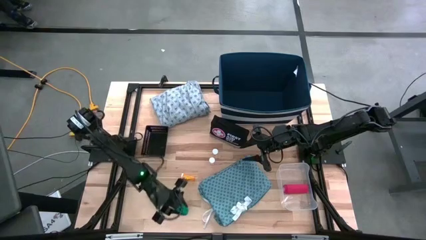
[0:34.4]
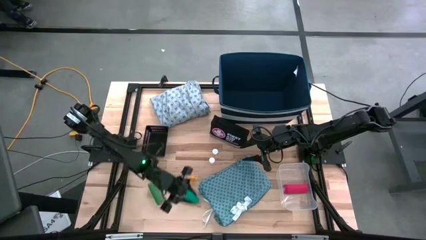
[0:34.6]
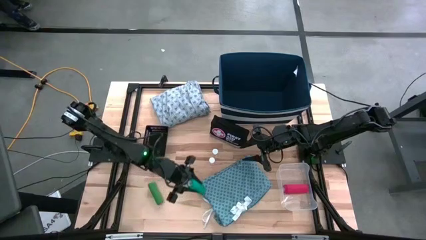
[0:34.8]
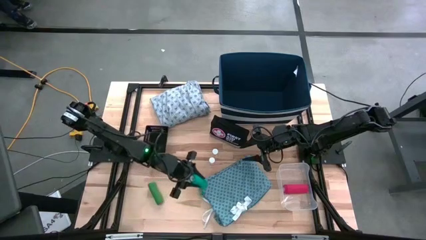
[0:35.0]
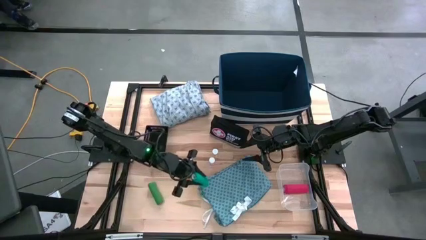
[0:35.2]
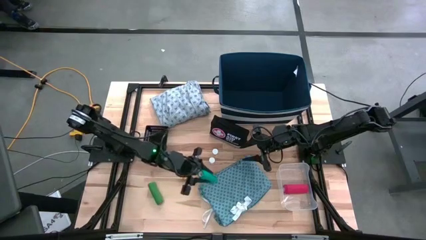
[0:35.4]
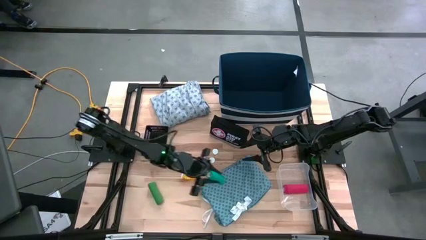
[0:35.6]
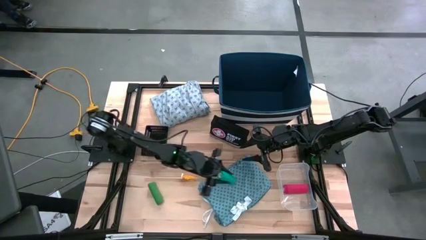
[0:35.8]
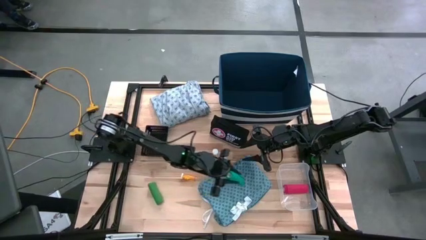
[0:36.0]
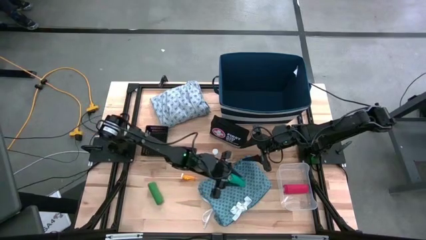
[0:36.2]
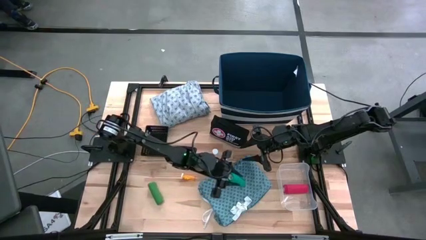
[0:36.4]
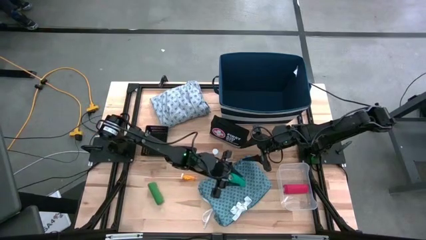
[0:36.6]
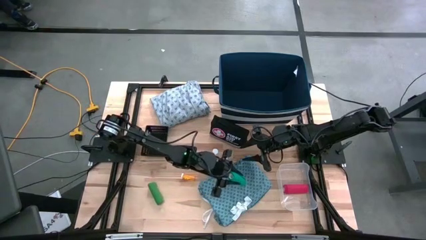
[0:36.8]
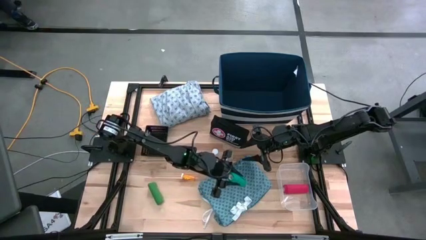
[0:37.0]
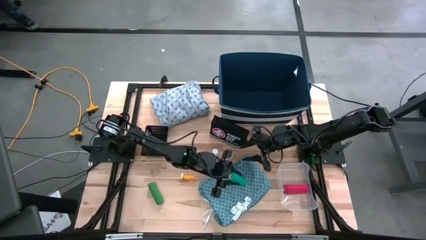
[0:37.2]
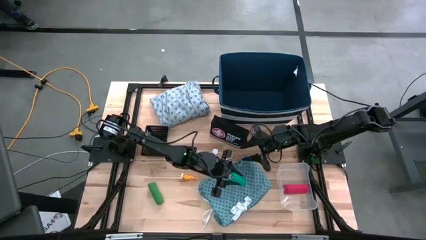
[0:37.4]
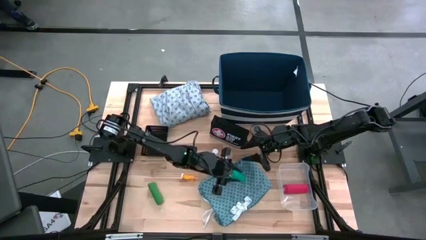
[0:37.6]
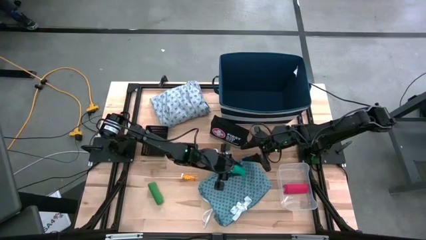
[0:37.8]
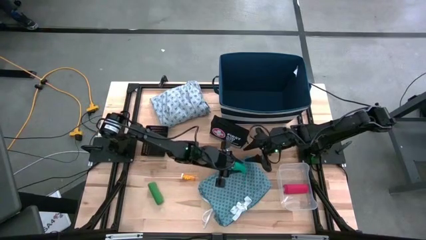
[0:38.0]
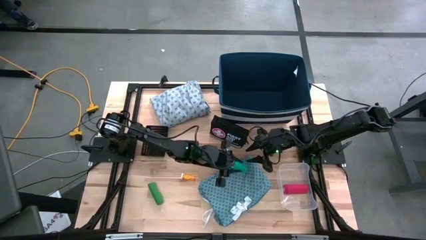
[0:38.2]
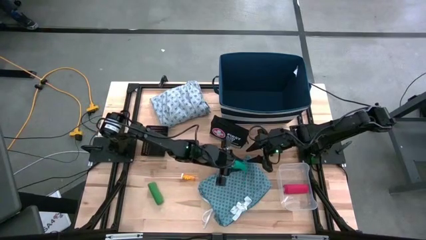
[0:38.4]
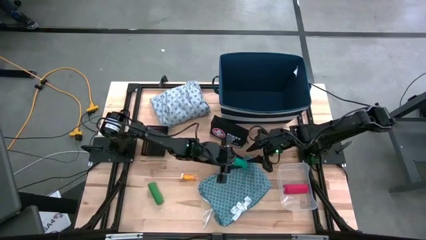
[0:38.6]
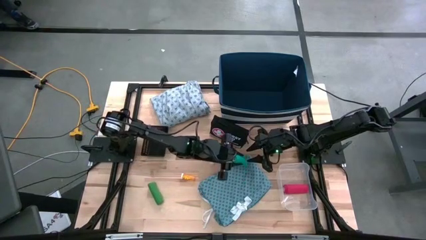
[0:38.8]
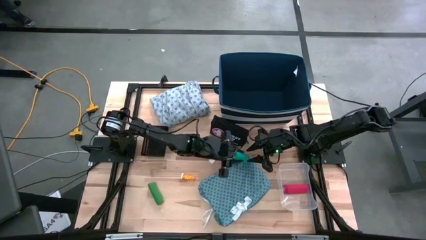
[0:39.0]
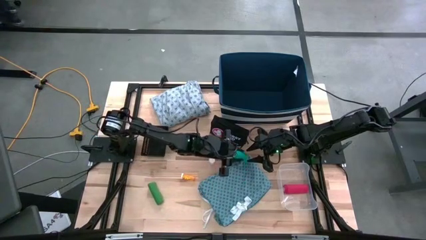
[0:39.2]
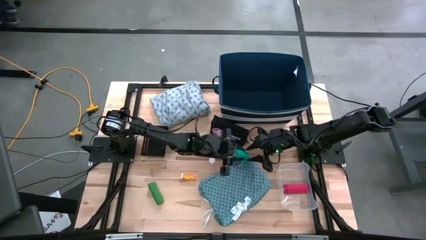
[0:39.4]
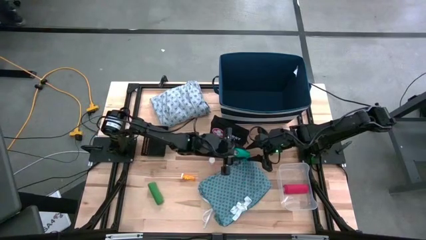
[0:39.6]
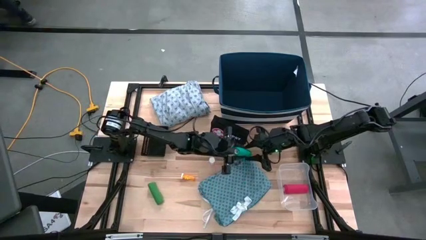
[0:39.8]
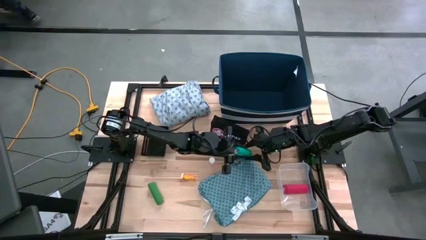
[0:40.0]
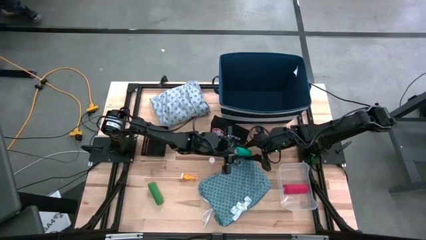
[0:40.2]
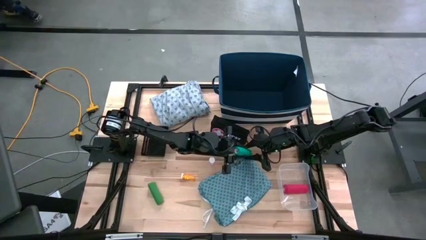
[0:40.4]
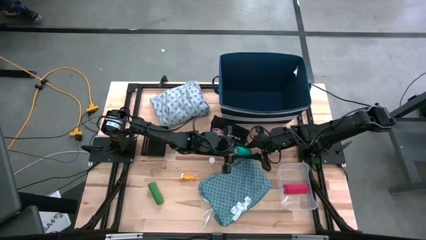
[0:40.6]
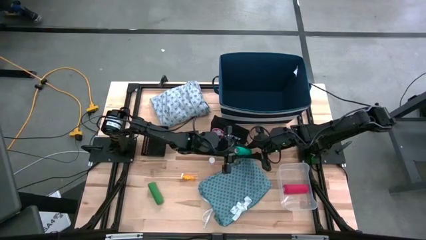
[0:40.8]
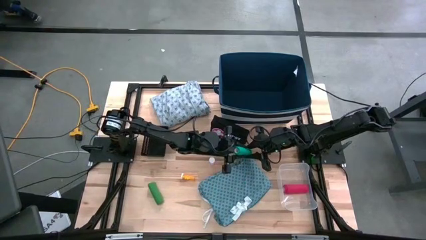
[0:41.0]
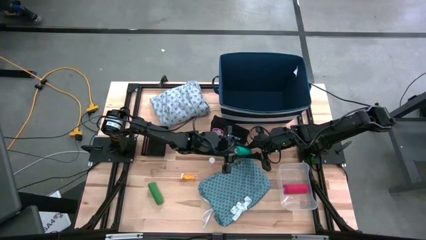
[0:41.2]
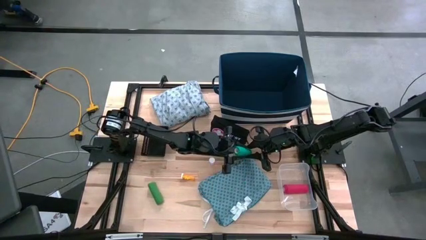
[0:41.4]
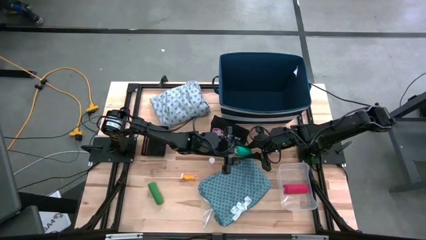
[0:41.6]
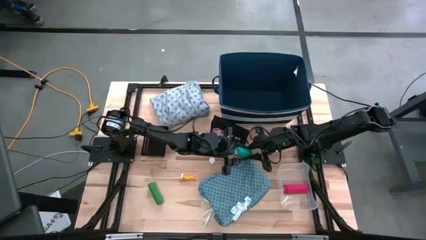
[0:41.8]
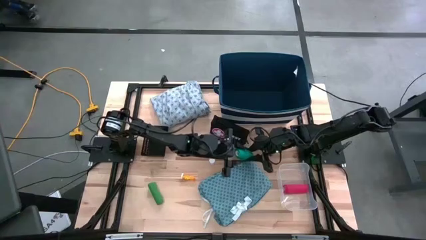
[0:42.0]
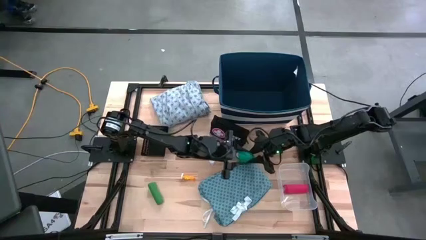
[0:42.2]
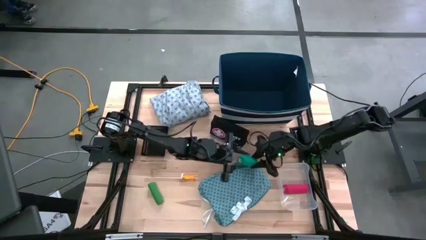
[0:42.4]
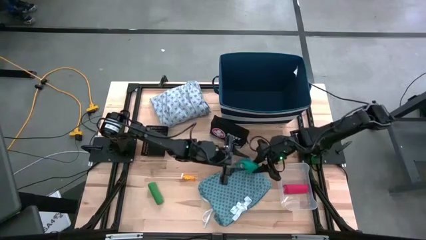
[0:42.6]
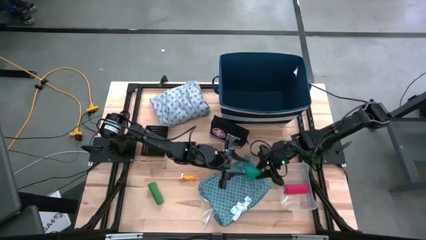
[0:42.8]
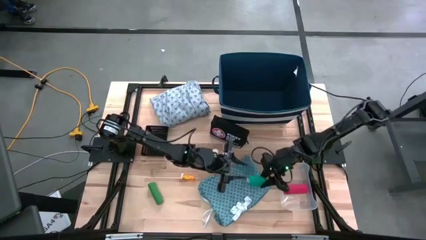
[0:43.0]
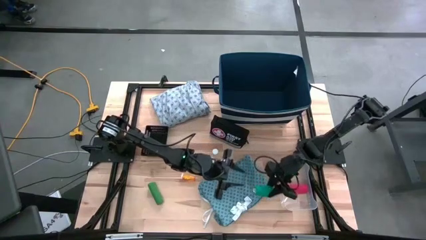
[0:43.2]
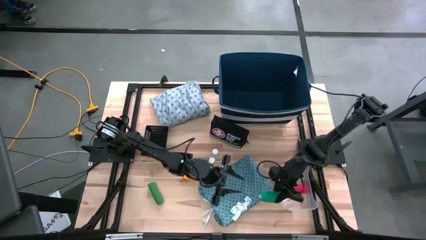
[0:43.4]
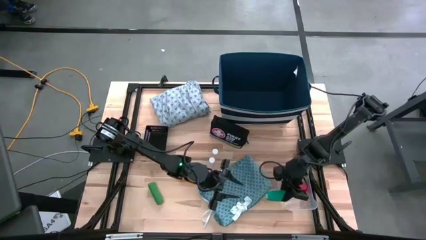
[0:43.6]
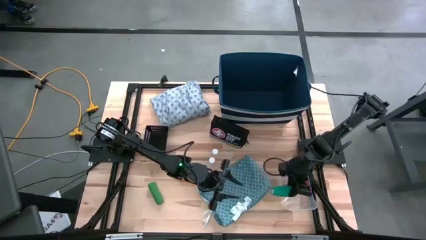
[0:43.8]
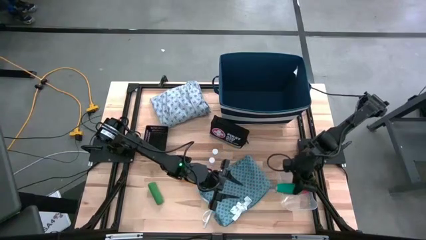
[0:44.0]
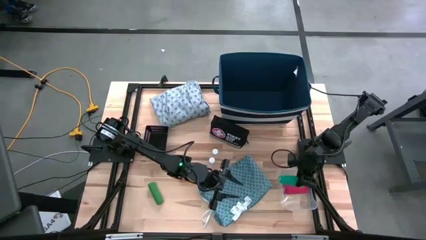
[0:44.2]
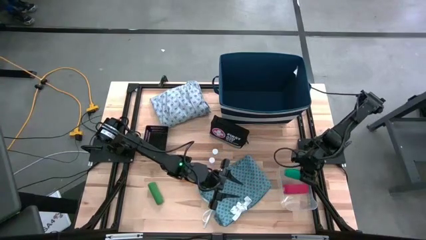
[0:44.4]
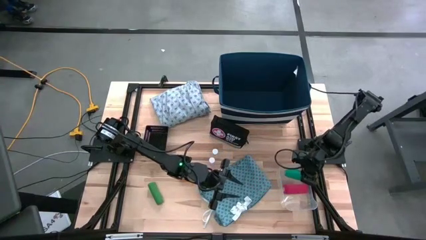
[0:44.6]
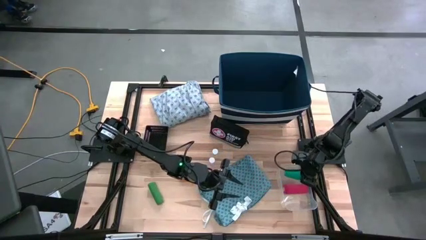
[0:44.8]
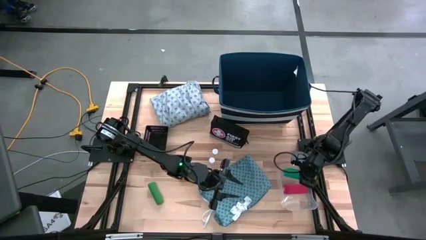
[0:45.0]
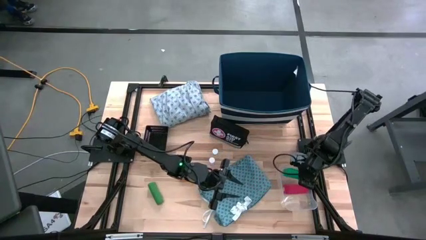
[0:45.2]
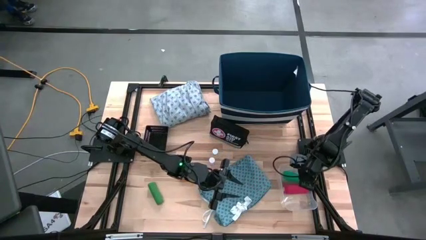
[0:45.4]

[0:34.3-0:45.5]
Task: Pick & place medical supplies in basket/bin
Put the dark green bandage into the transparent bin
